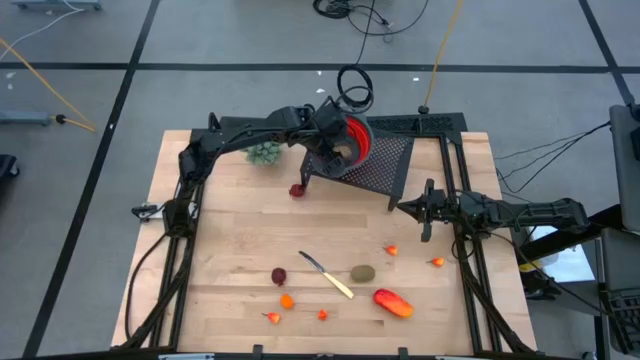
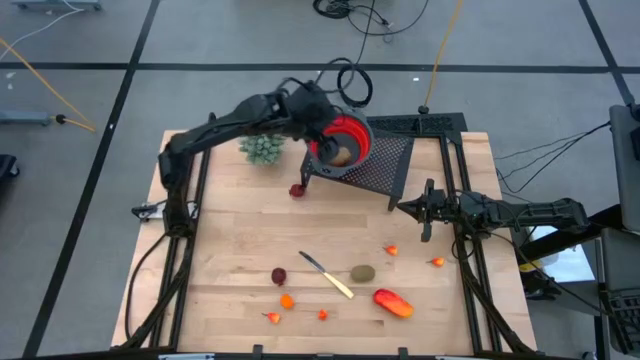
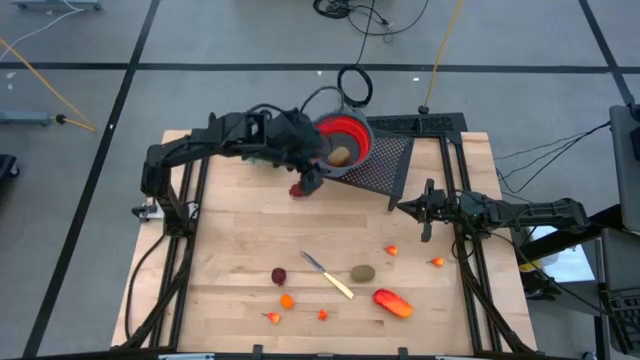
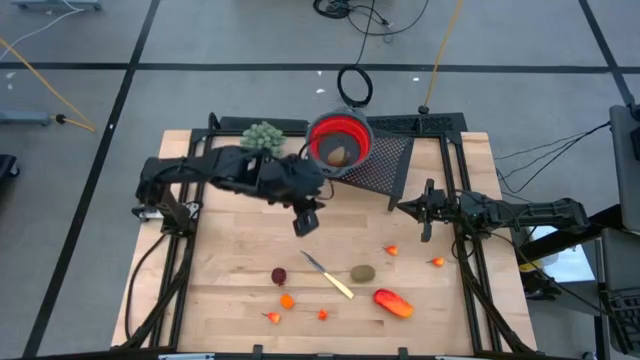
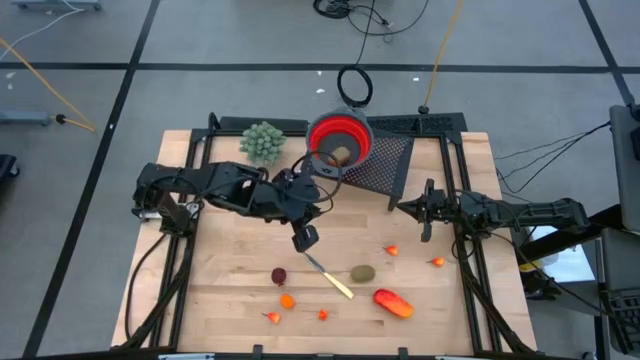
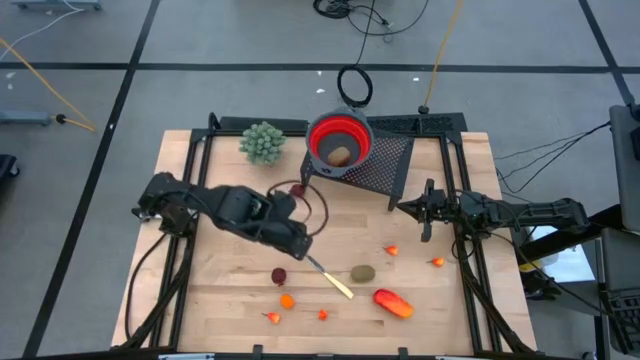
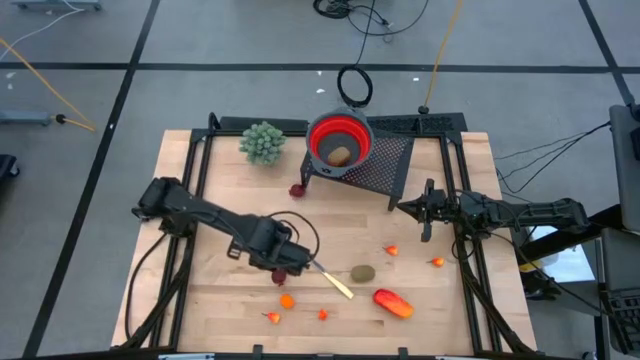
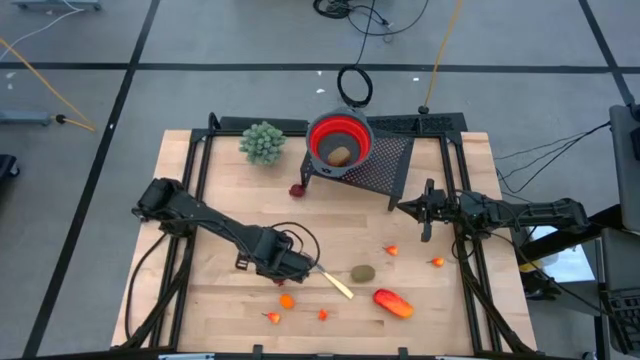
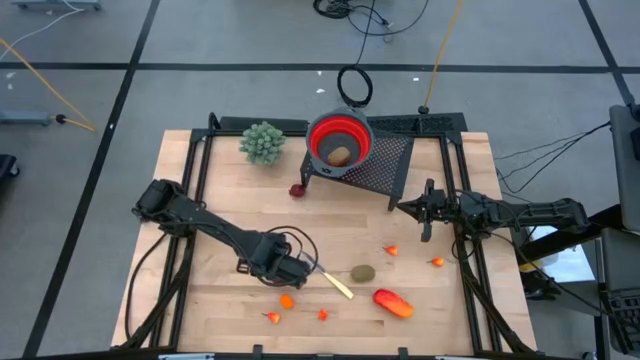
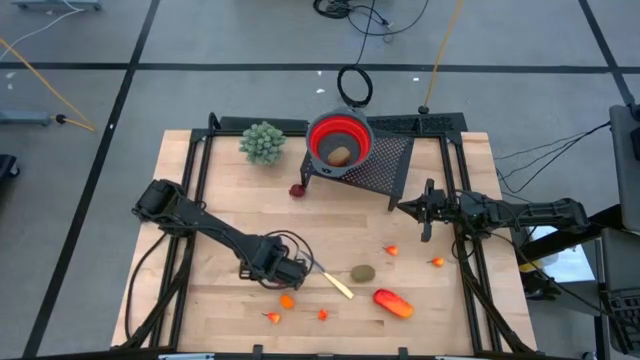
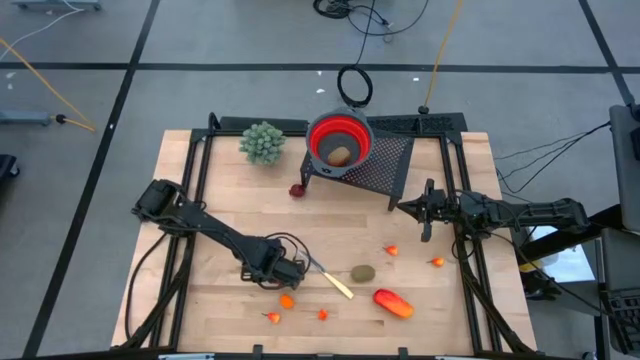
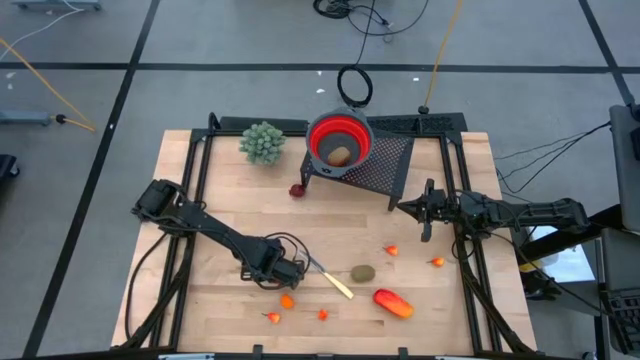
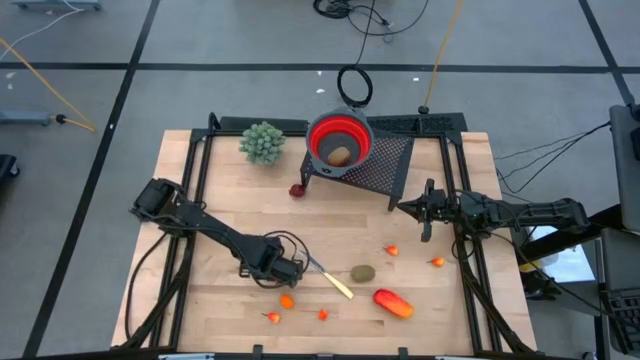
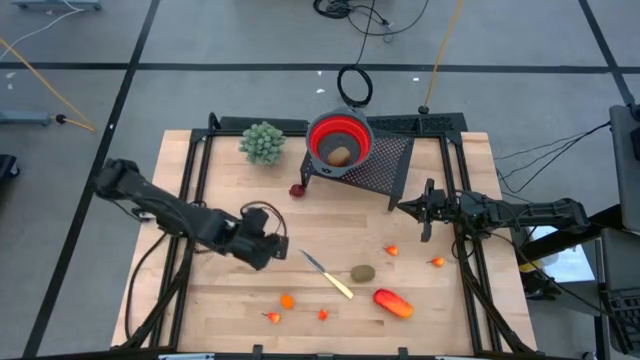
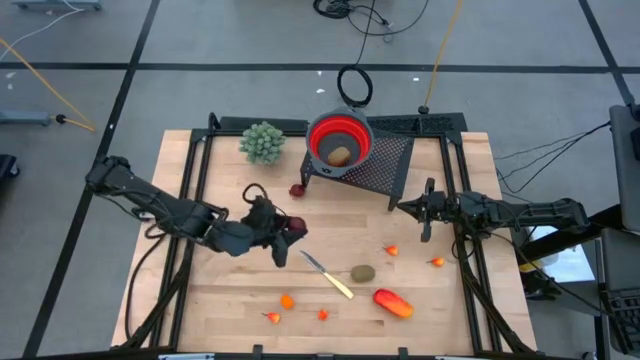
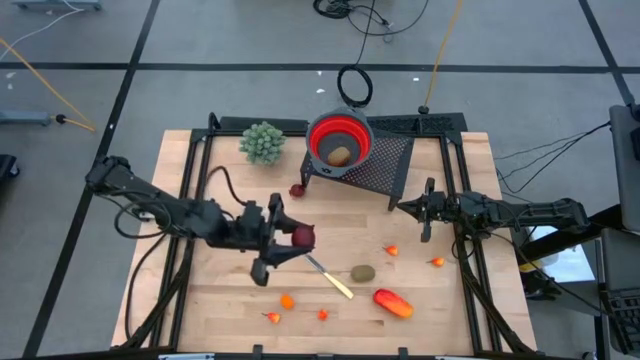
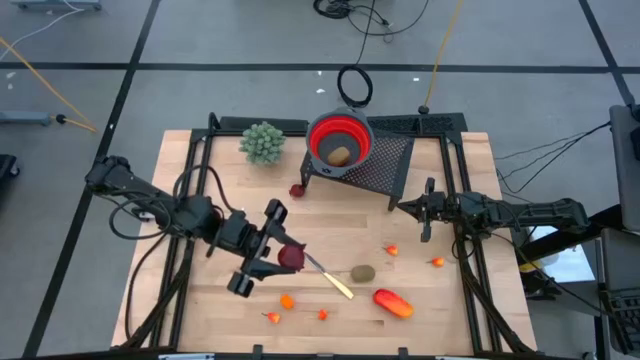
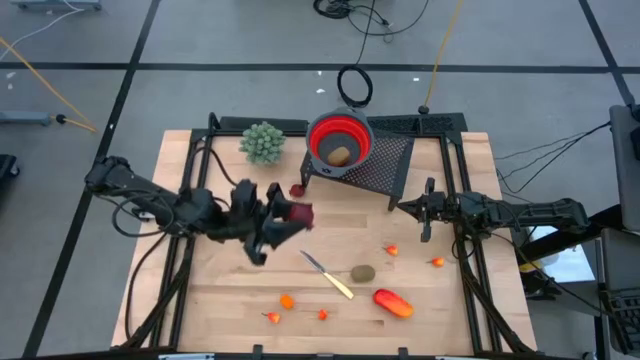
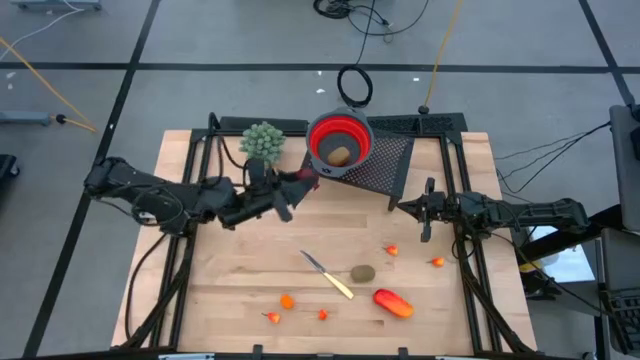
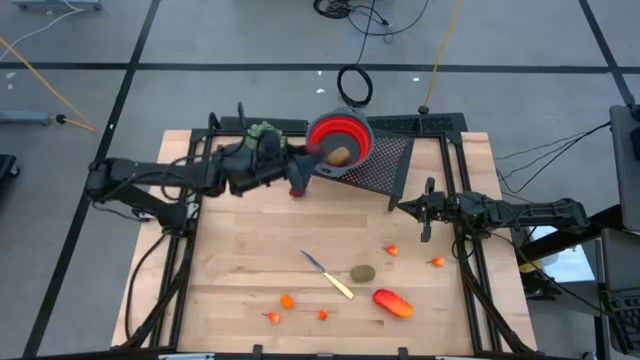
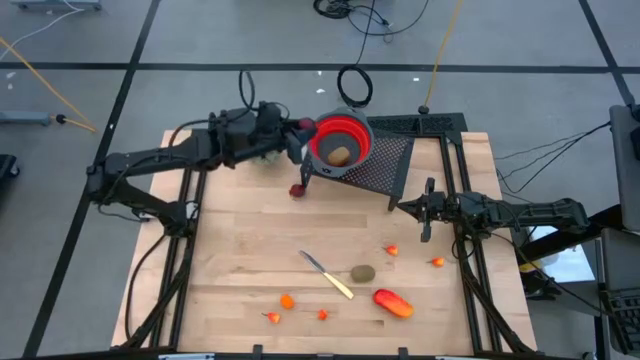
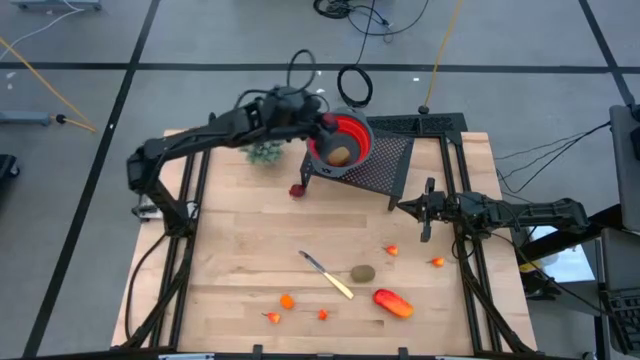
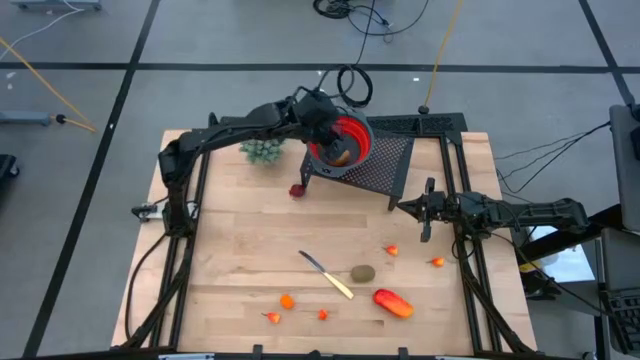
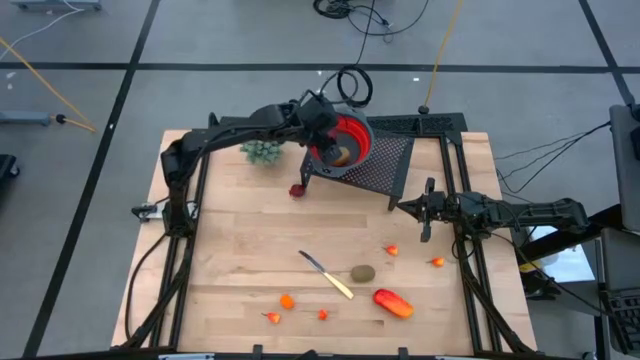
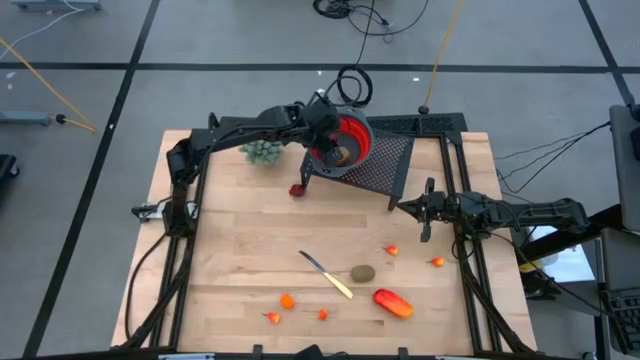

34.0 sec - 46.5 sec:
Task: Pick & Place Fruit
Put the red pomegranate into the red strainer bowl on the shelf

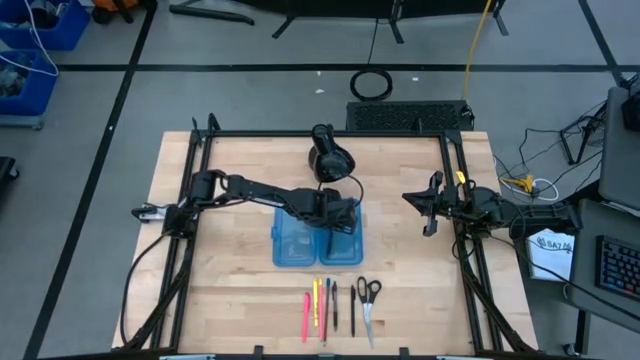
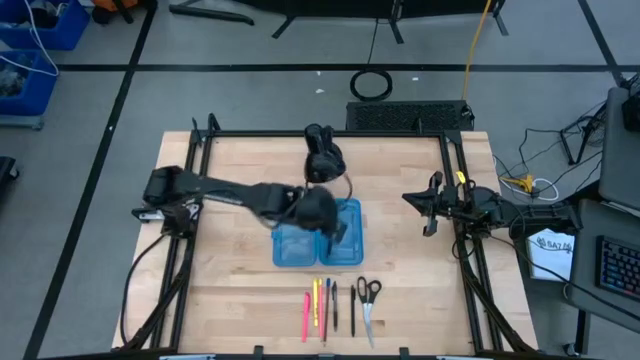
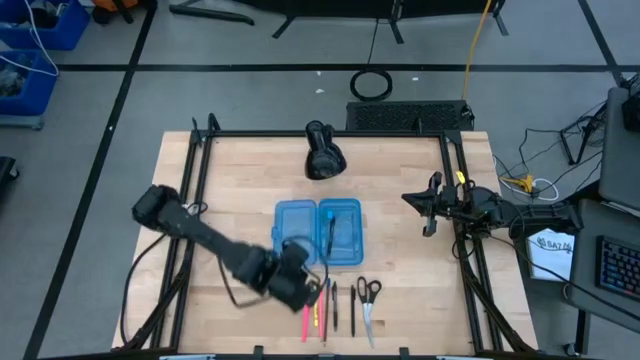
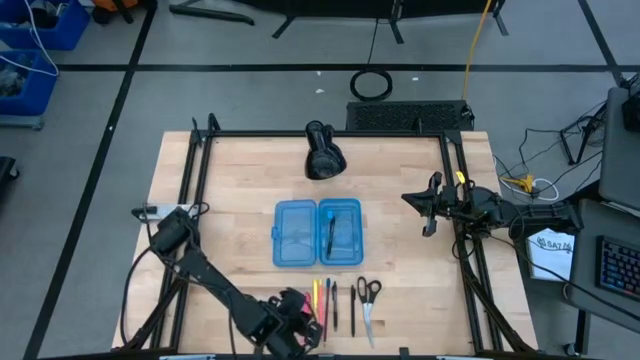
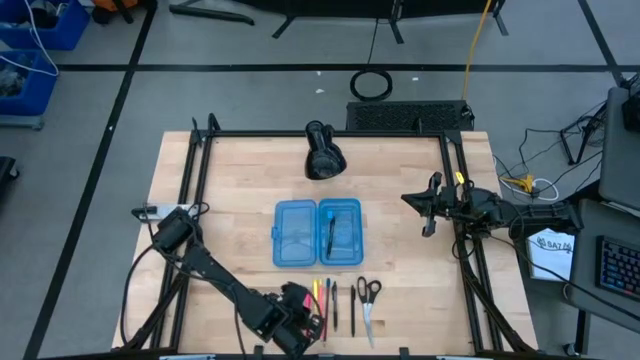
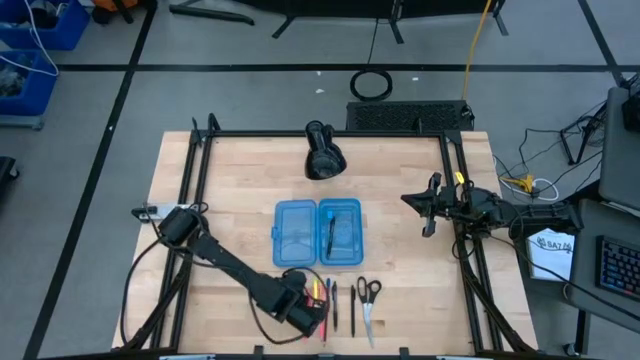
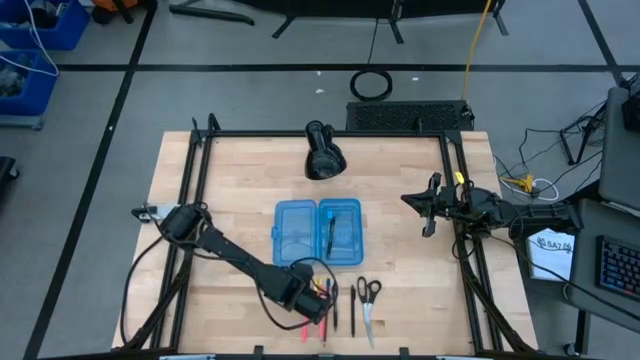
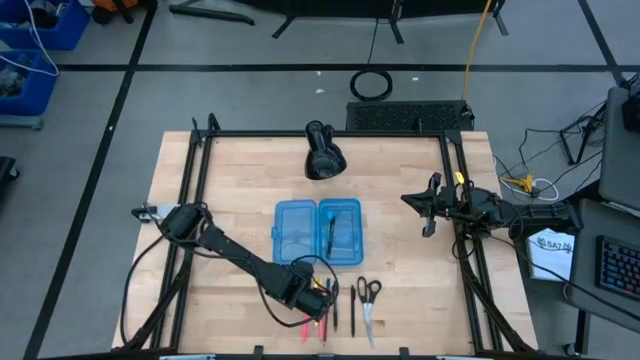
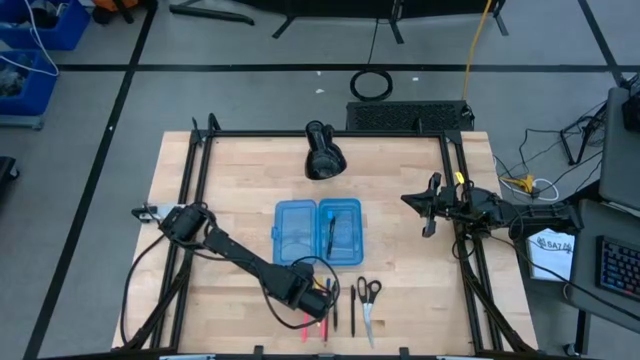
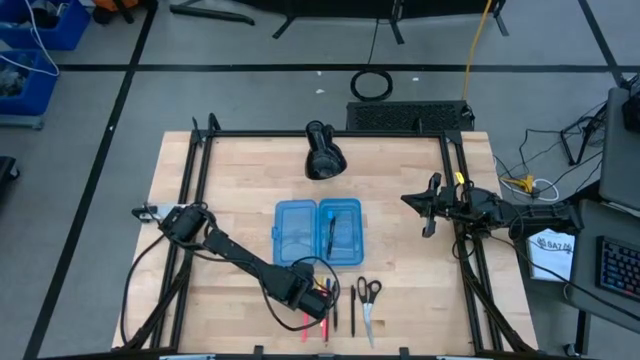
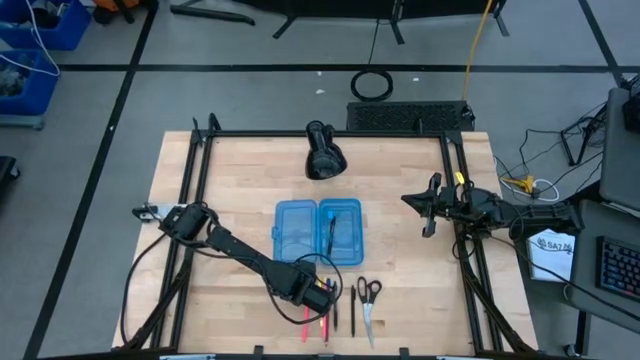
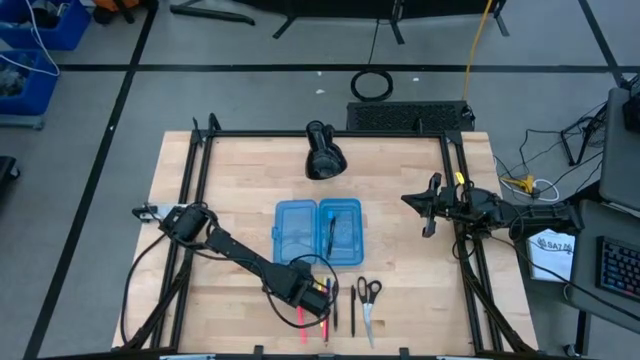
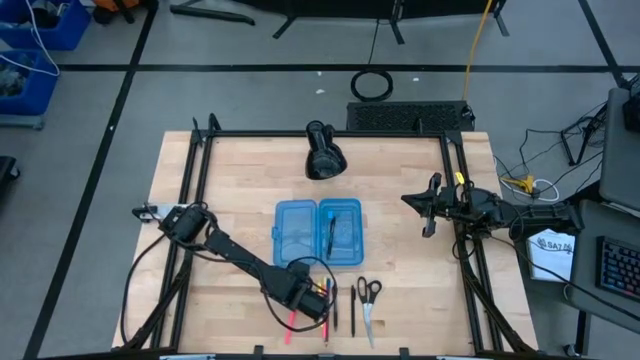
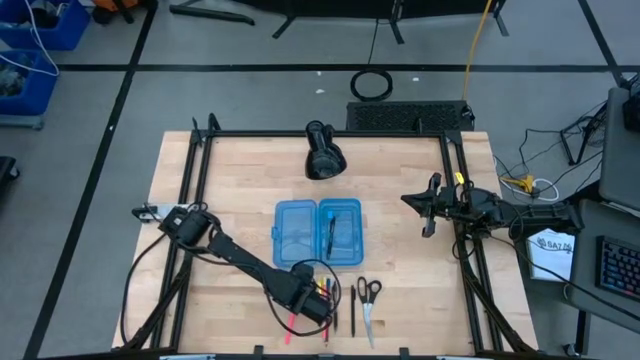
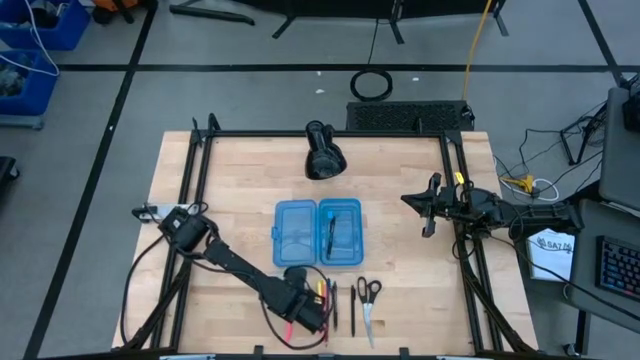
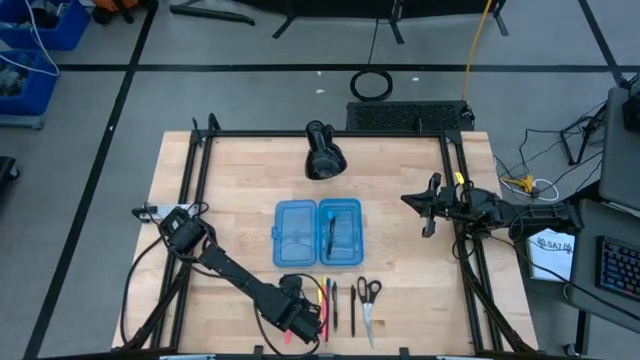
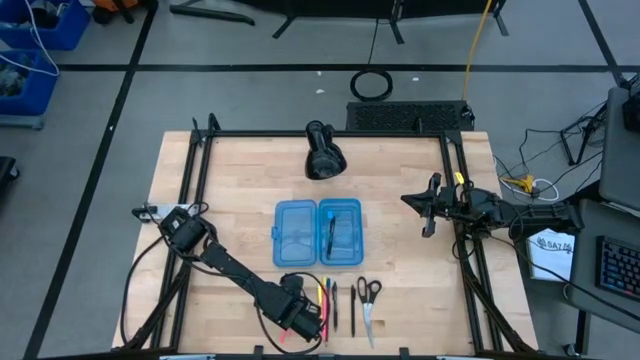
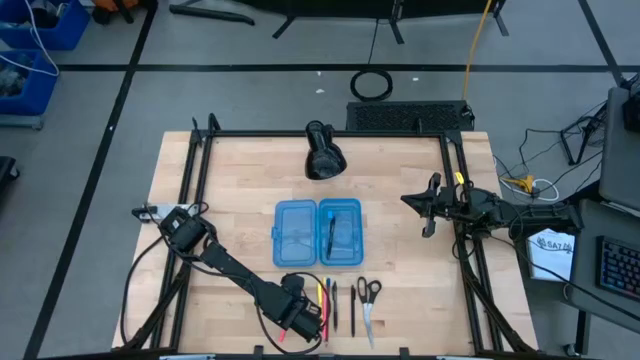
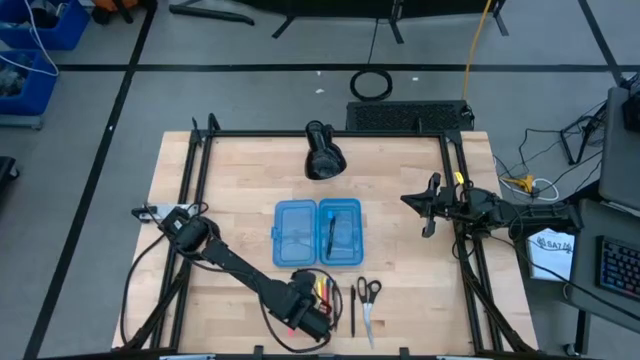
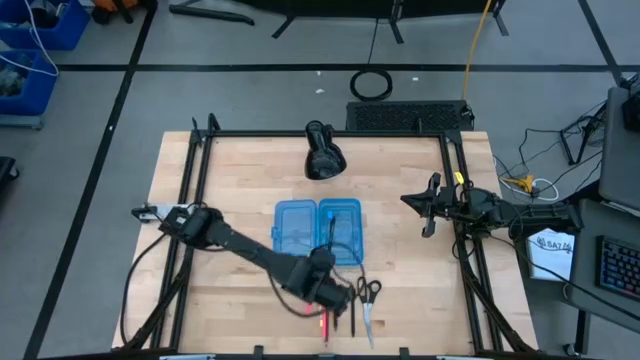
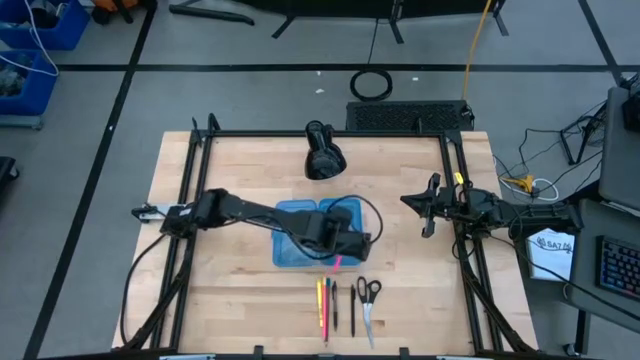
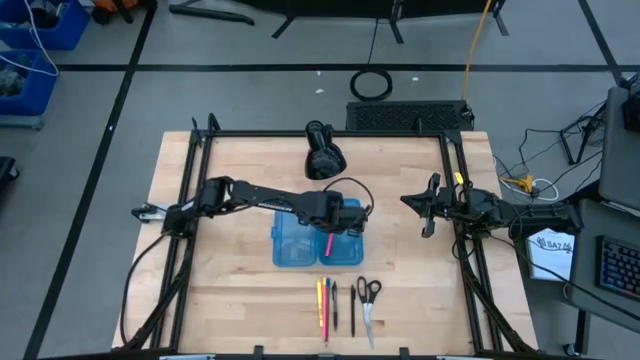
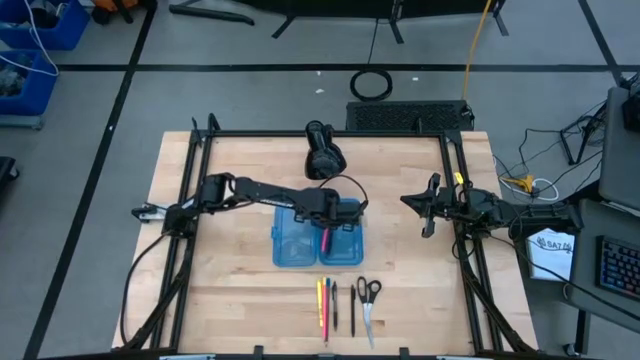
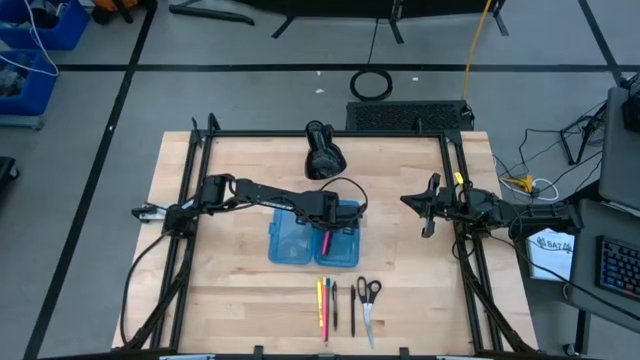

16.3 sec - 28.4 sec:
Task: Pick & place school supplies into a supply box
Put the left pink pen into the blue supply box
